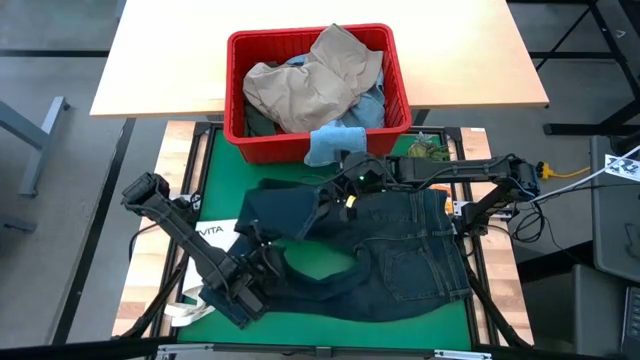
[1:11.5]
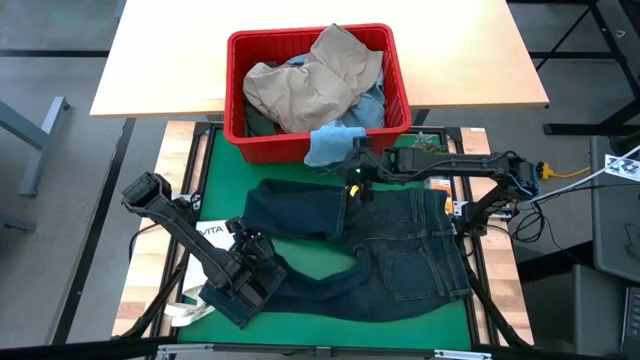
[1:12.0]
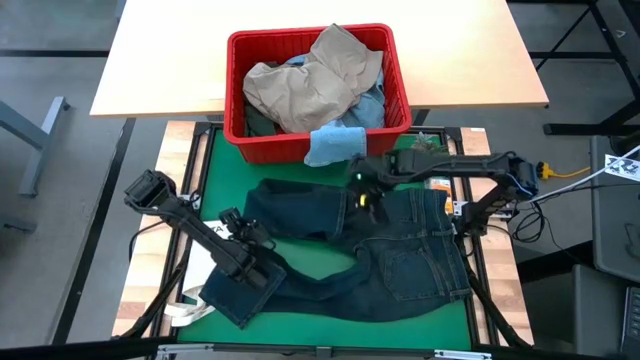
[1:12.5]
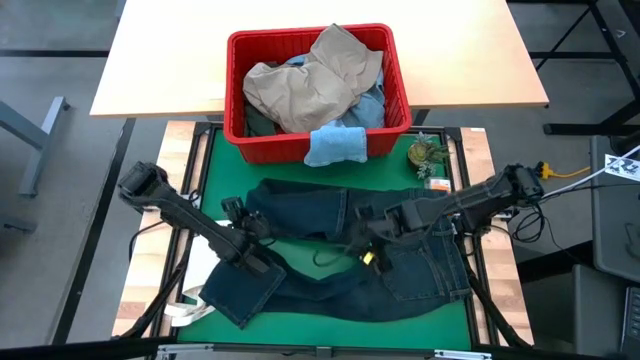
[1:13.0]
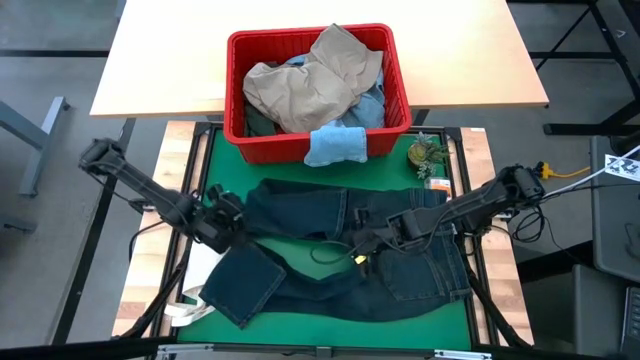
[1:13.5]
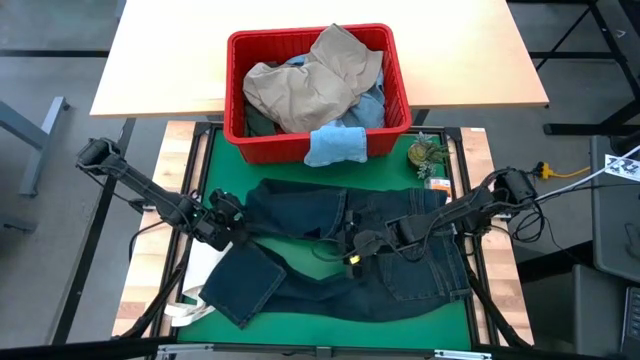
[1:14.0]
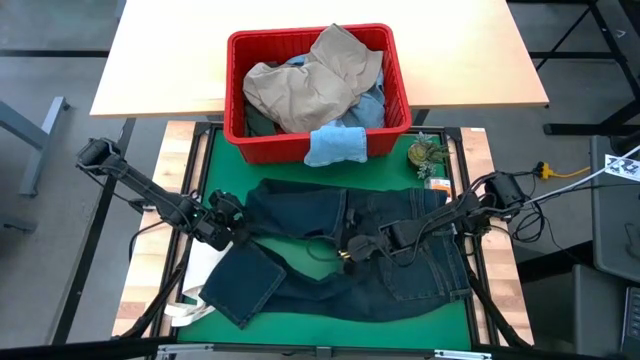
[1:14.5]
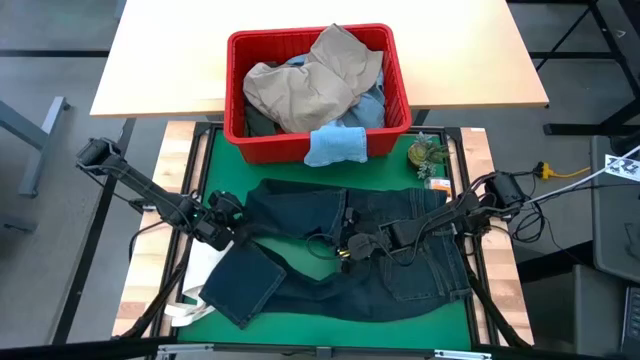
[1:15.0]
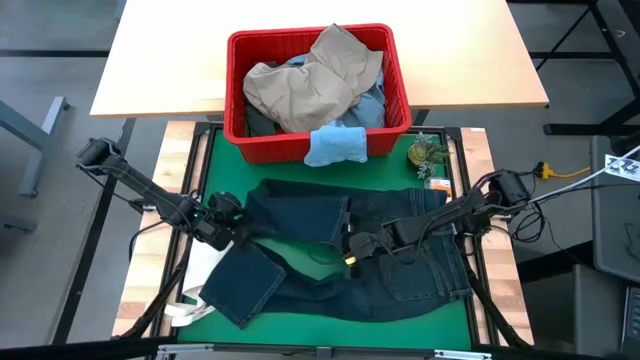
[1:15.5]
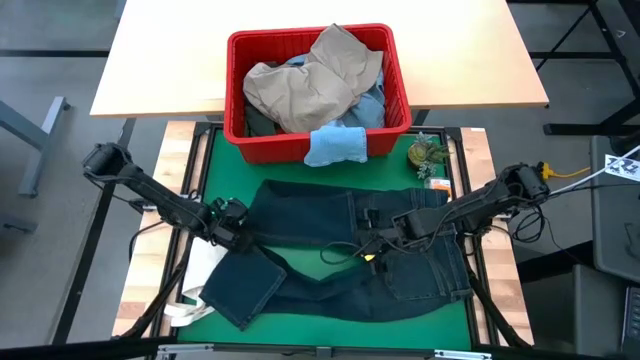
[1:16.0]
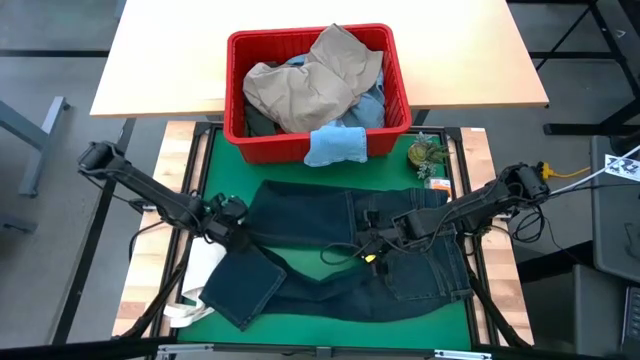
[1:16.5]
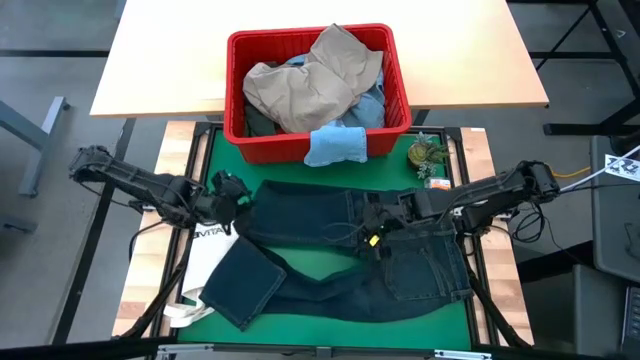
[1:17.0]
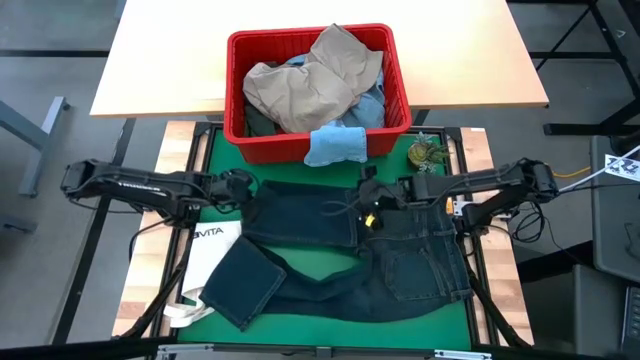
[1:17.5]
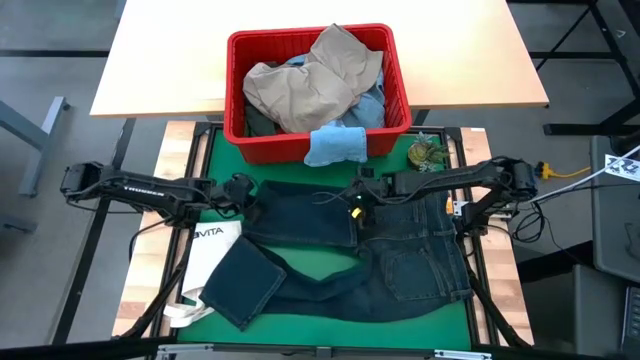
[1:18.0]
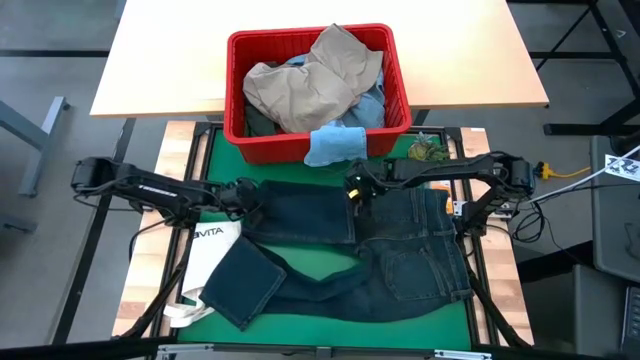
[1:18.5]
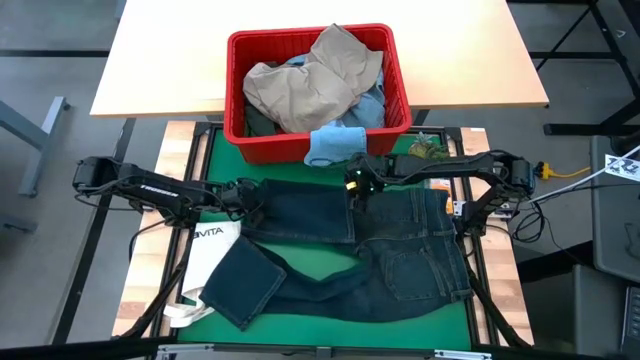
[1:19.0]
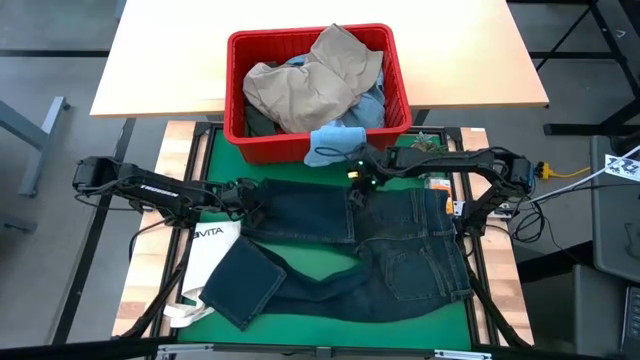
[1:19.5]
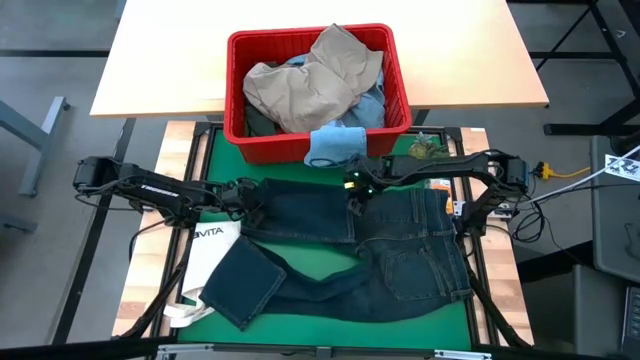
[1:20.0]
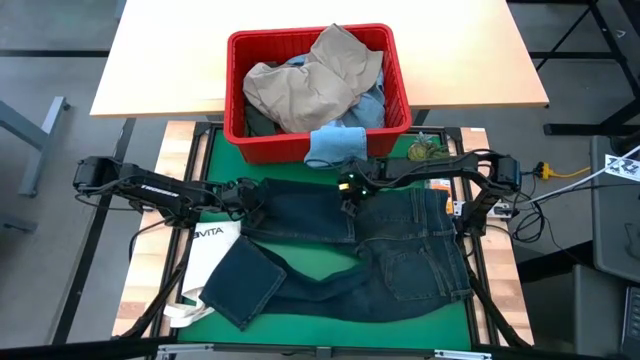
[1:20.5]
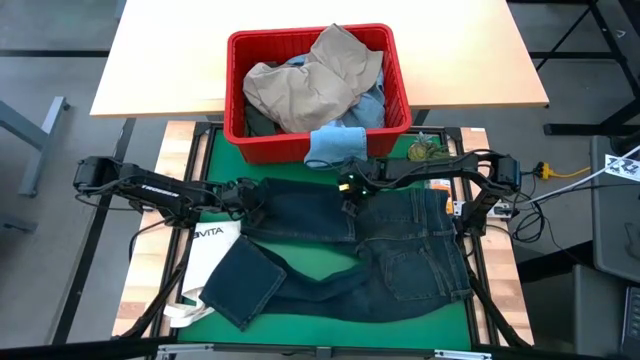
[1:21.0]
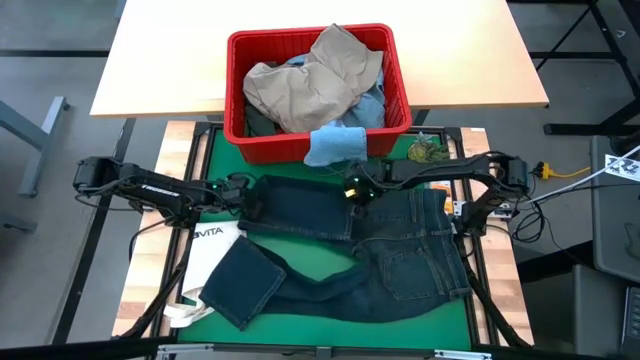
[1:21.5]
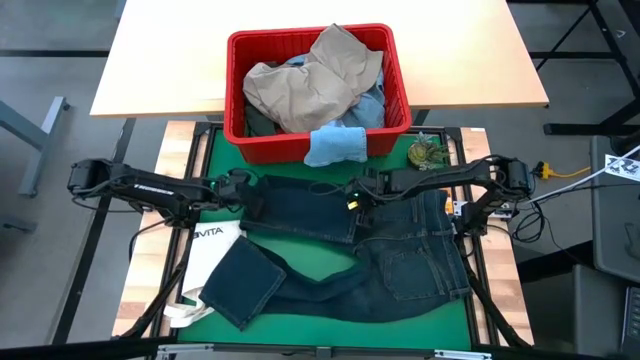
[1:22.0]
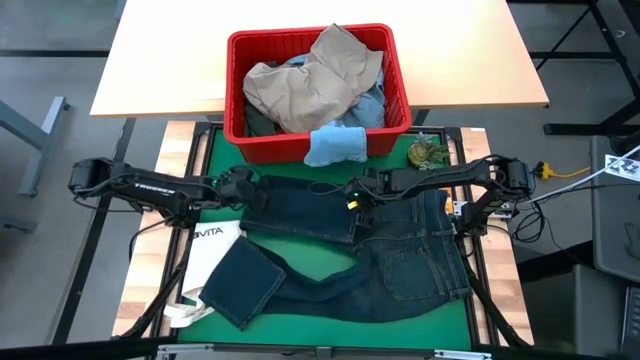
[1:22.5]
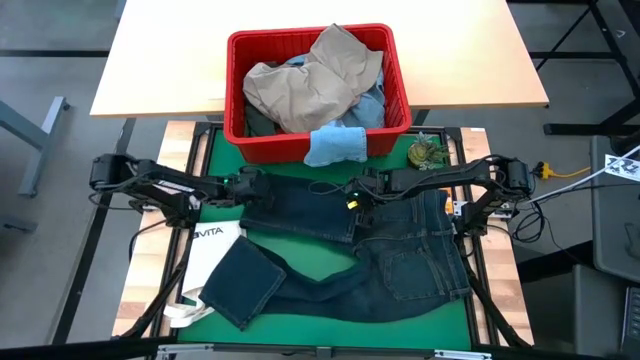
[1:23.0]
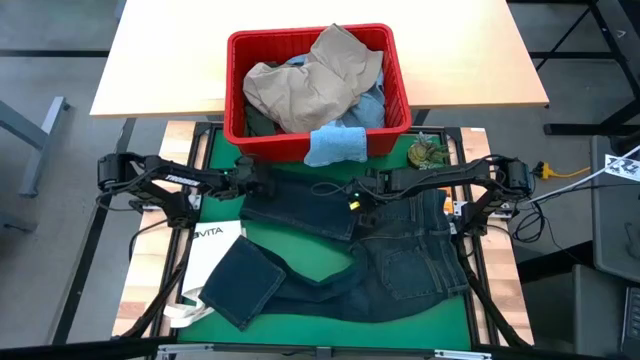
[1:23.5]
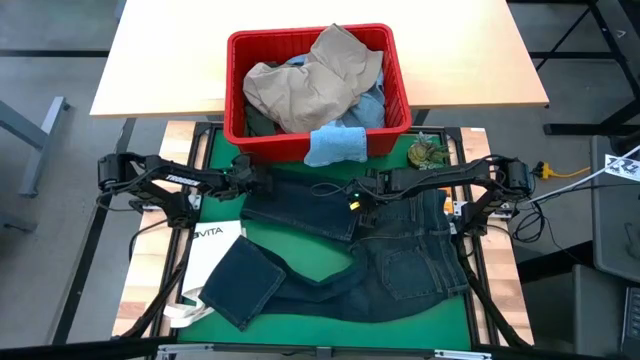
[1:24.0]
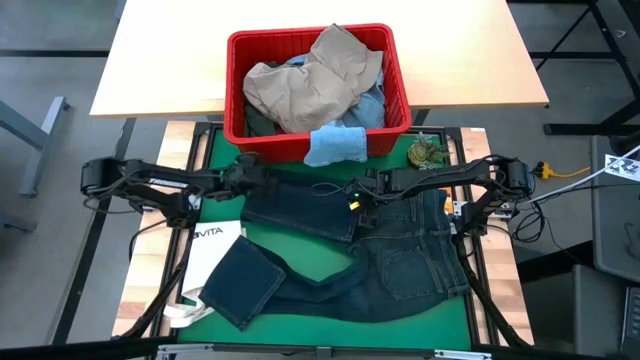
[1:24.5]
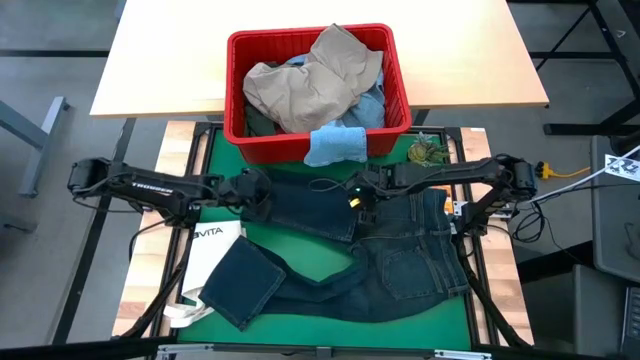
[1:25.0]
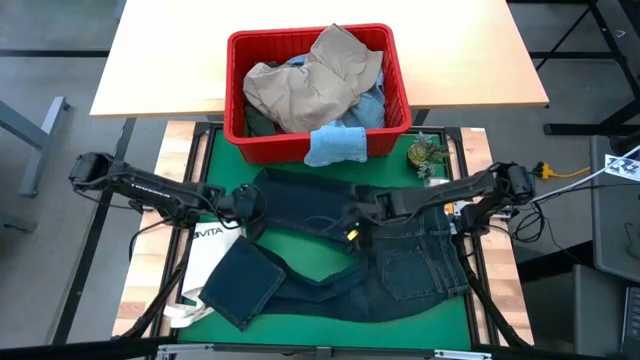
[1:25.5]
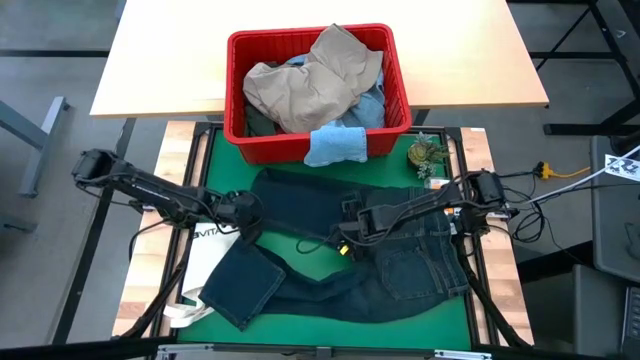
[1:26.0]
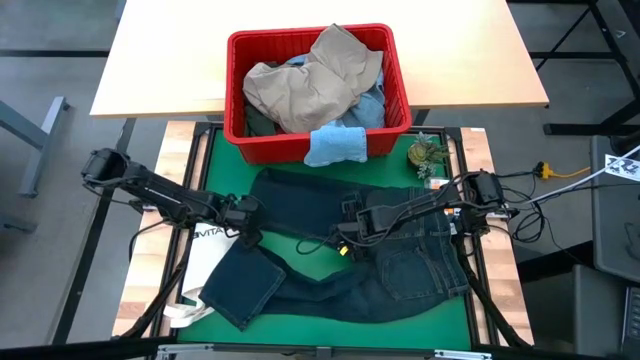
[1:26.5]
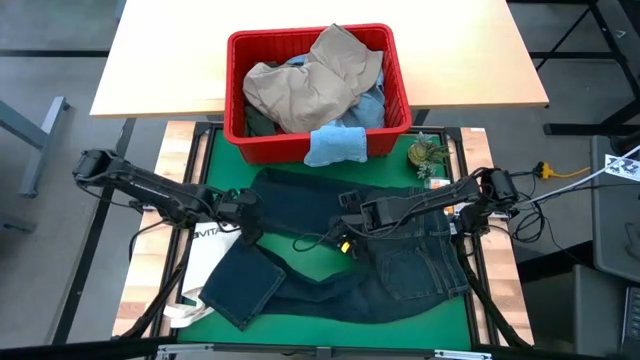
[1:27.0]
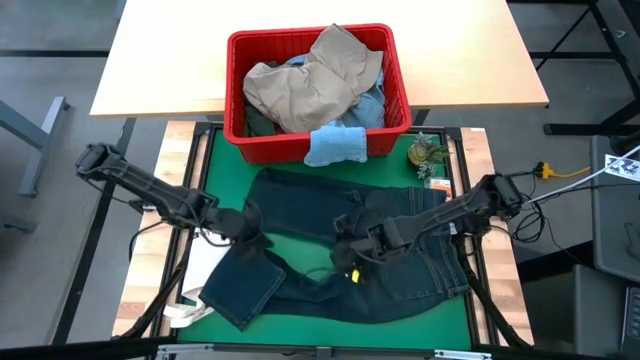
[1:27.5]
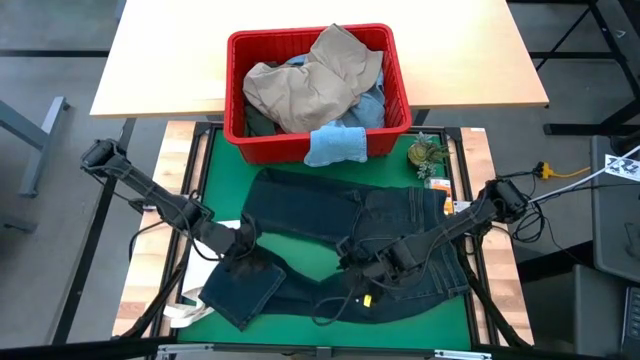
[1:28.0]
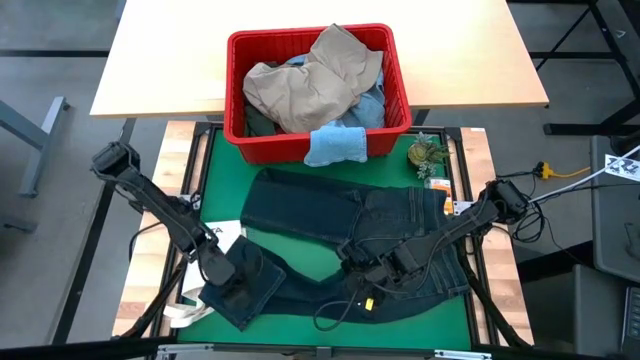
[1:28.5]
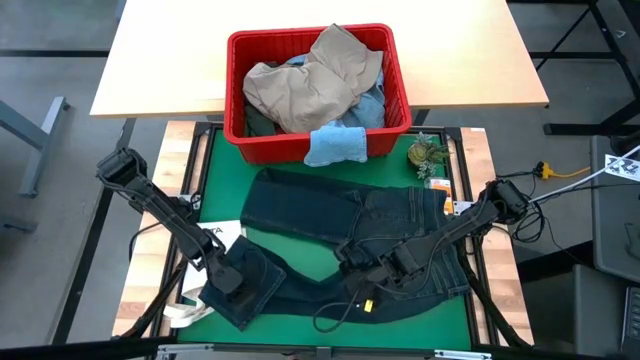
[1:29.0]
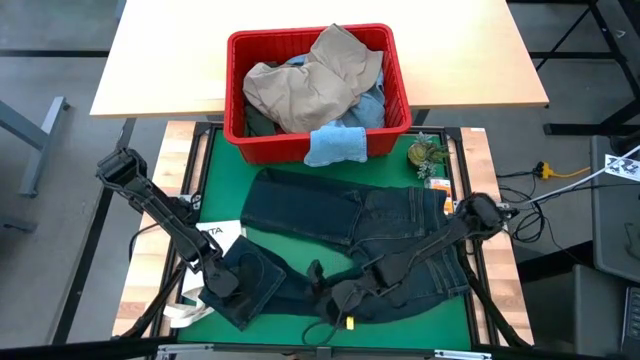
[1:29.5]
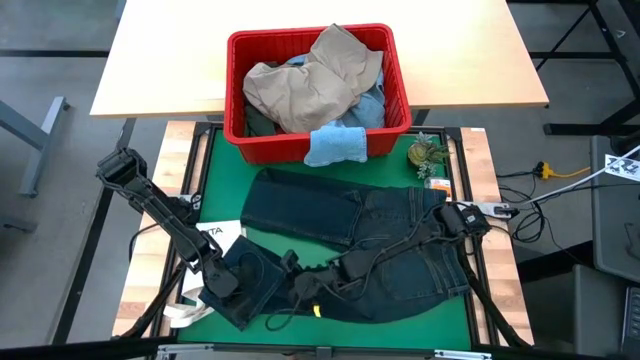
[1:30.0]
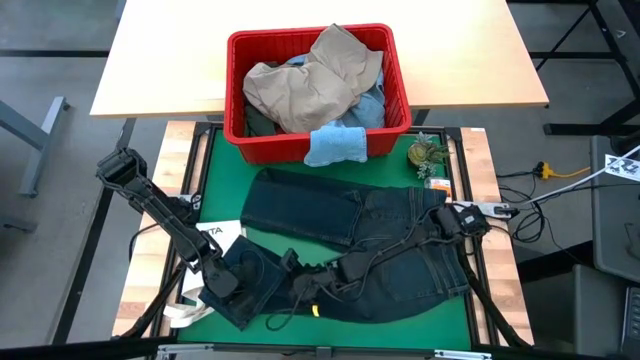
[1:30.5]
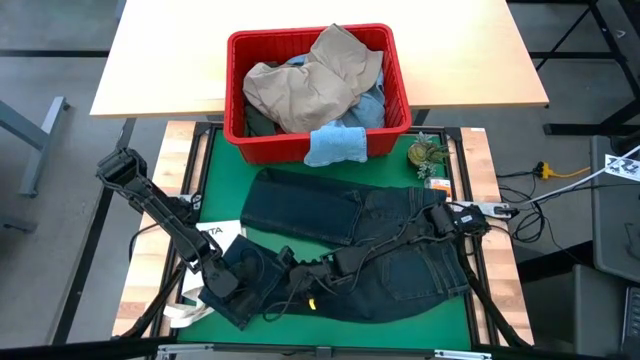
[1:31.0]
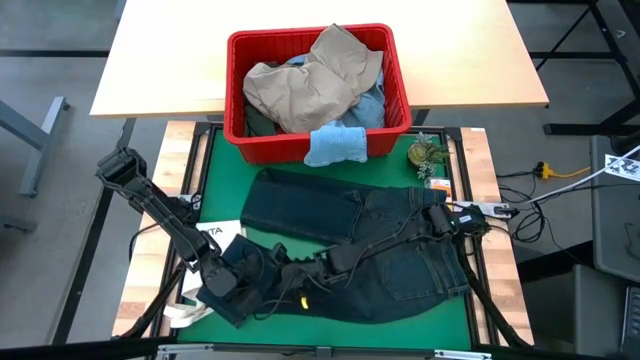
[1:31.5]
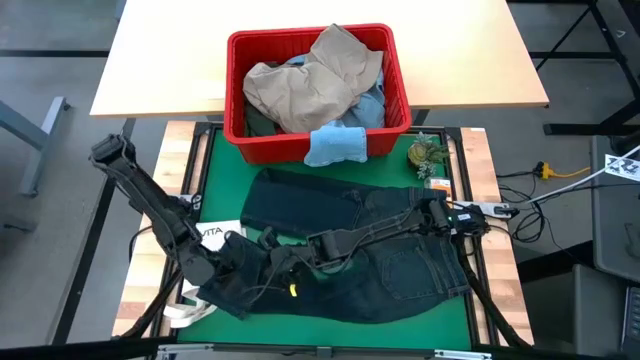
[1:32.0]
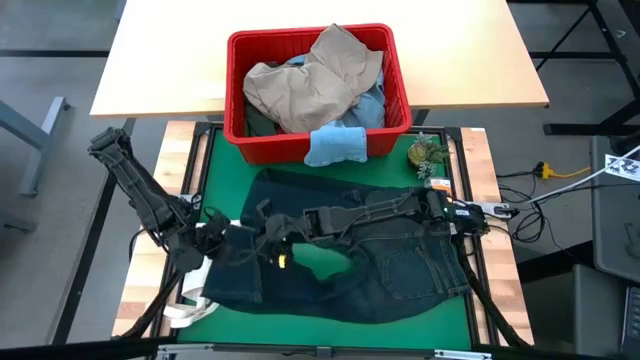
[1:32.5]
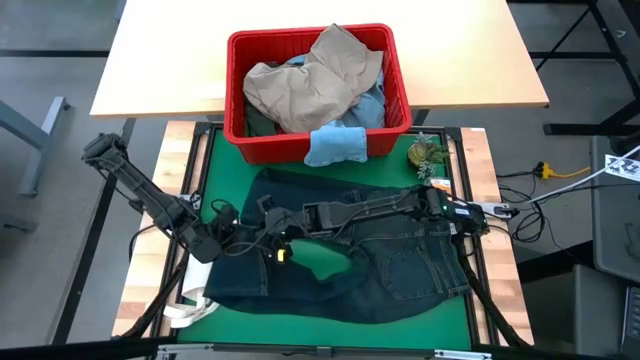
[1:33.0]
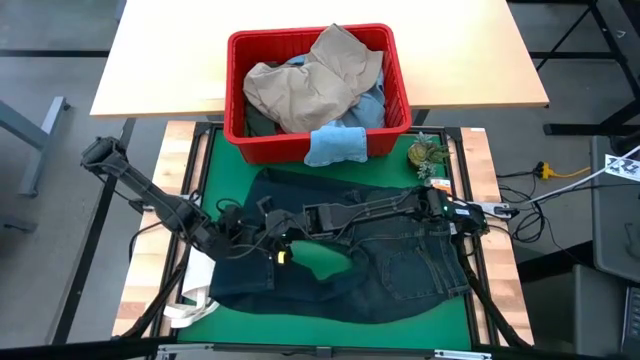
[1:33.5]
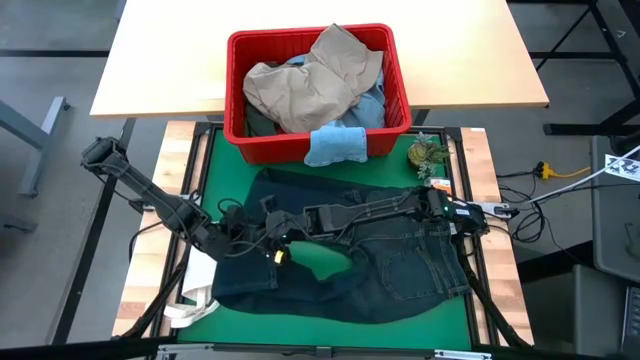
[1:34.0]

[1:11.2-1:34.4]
Task: Fold Laundry from Bin
Fold the dark blue pants
